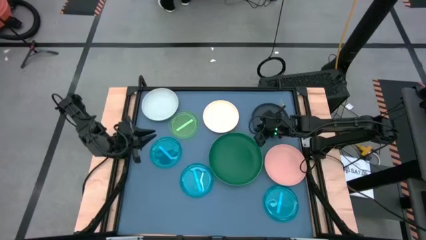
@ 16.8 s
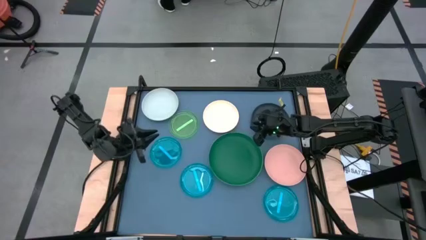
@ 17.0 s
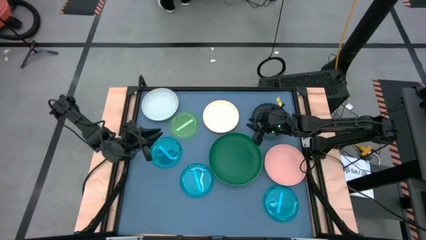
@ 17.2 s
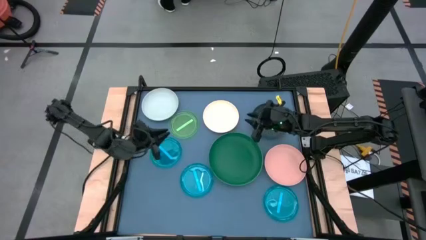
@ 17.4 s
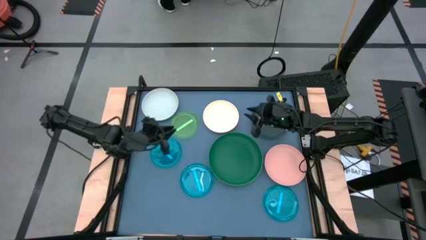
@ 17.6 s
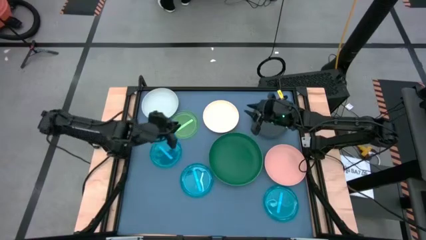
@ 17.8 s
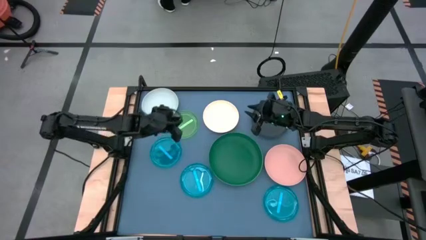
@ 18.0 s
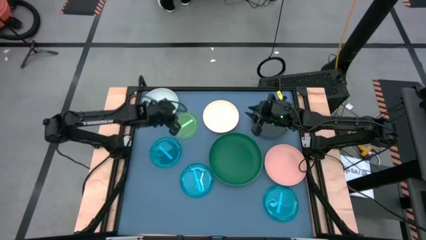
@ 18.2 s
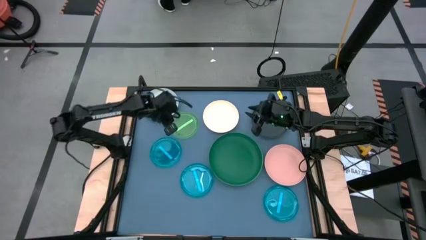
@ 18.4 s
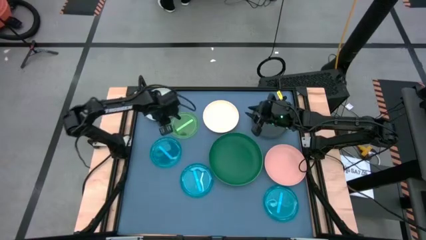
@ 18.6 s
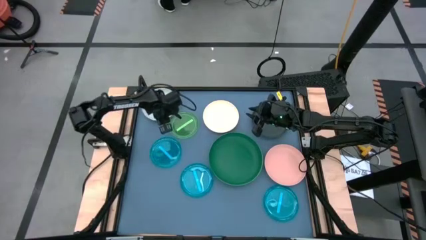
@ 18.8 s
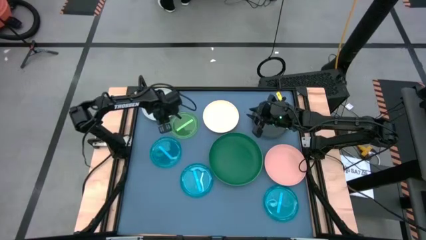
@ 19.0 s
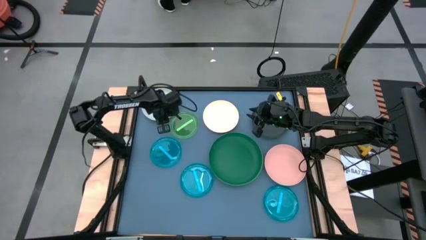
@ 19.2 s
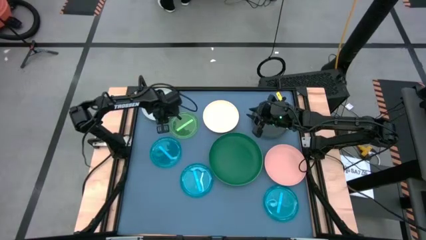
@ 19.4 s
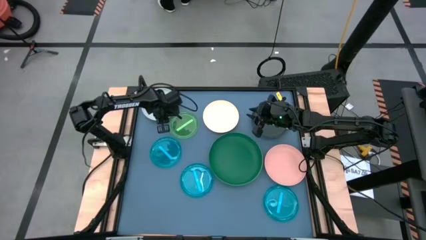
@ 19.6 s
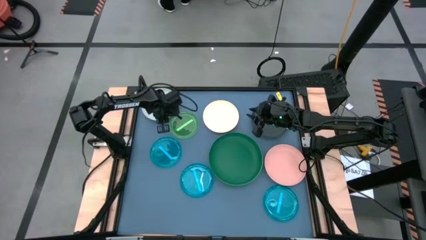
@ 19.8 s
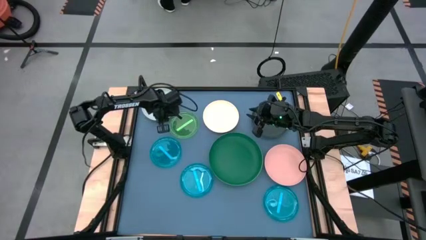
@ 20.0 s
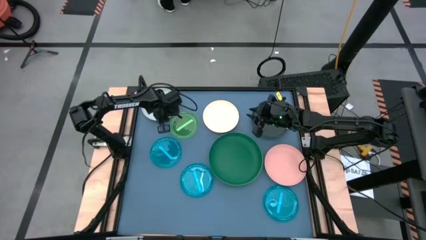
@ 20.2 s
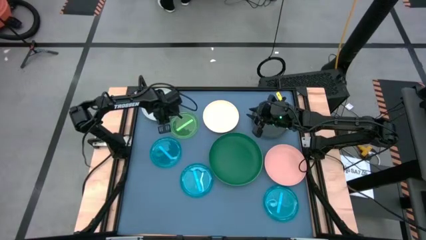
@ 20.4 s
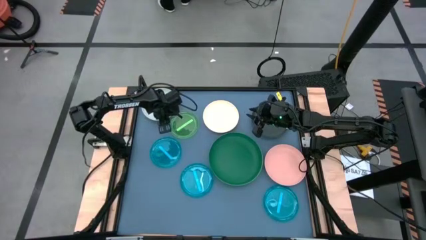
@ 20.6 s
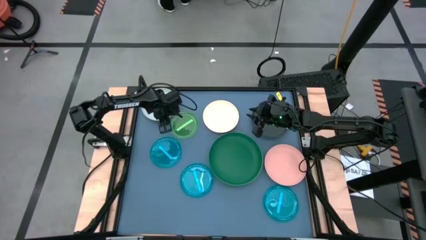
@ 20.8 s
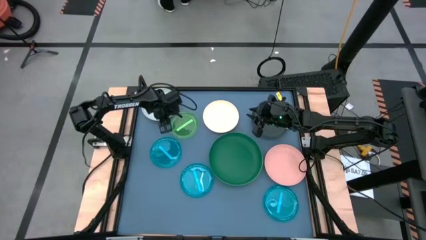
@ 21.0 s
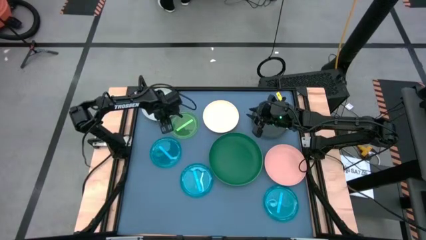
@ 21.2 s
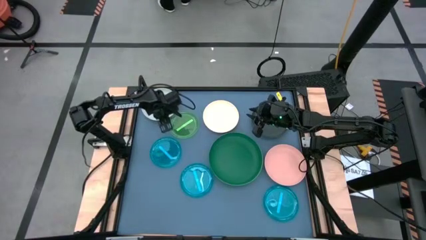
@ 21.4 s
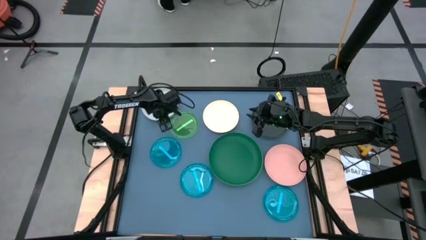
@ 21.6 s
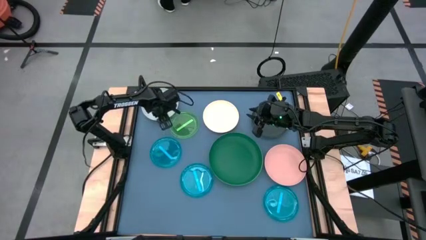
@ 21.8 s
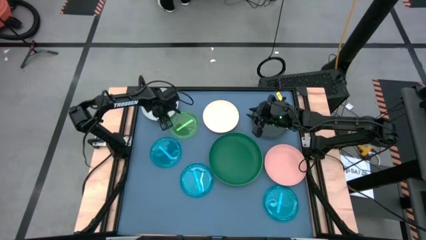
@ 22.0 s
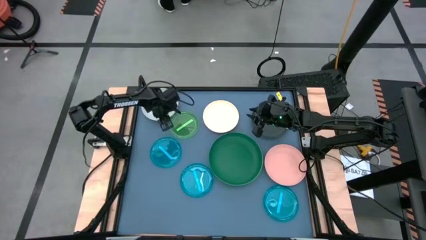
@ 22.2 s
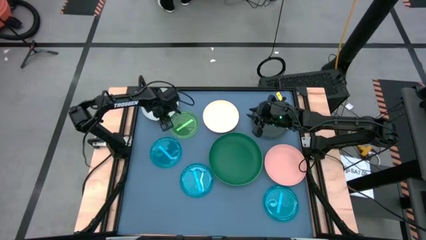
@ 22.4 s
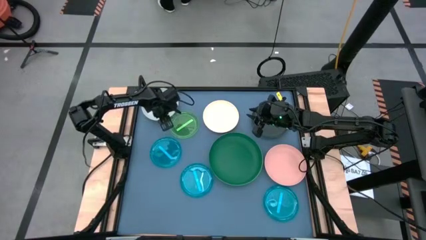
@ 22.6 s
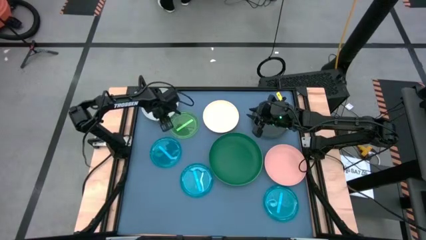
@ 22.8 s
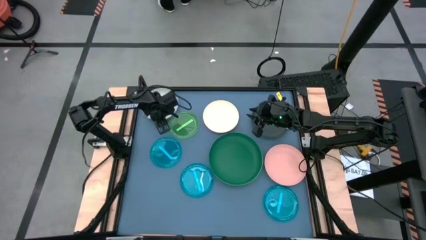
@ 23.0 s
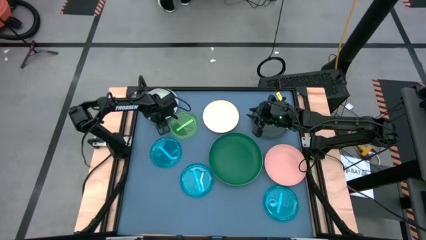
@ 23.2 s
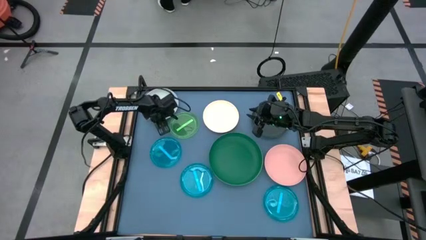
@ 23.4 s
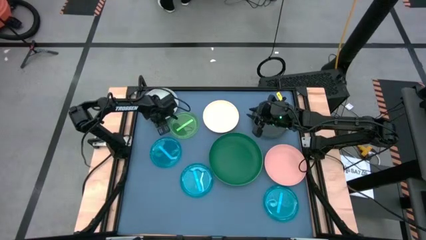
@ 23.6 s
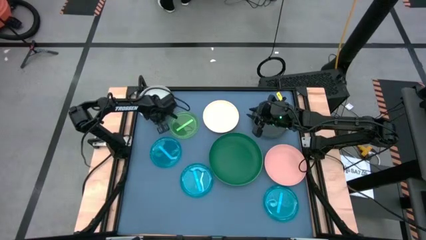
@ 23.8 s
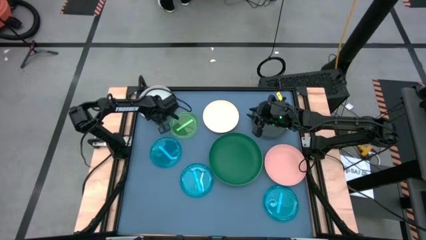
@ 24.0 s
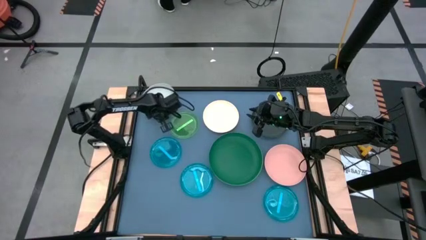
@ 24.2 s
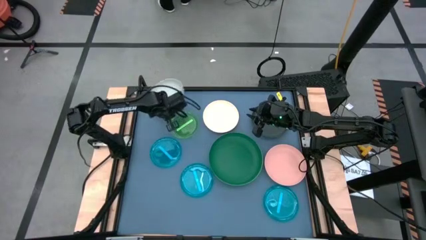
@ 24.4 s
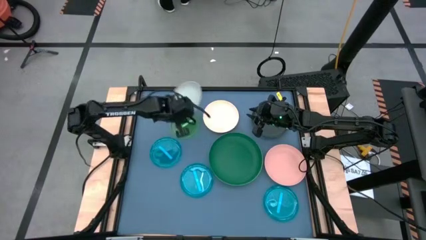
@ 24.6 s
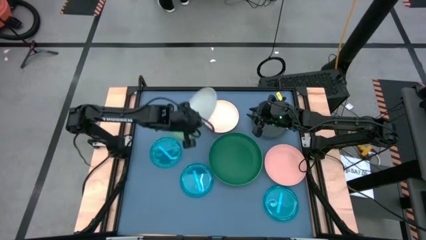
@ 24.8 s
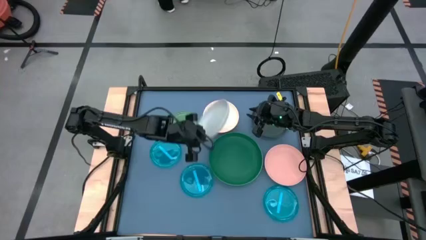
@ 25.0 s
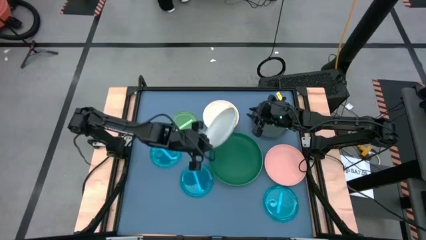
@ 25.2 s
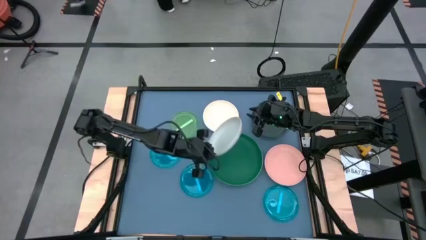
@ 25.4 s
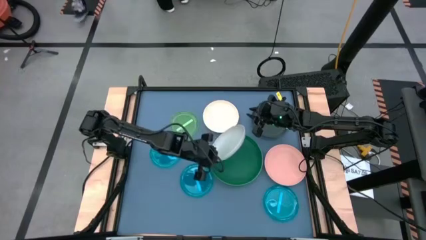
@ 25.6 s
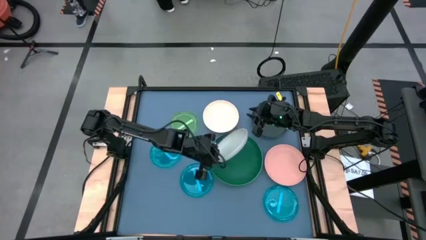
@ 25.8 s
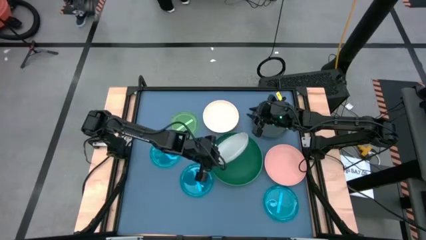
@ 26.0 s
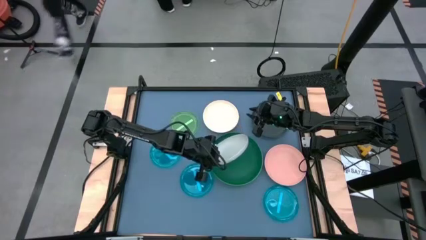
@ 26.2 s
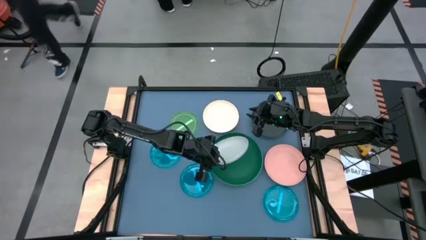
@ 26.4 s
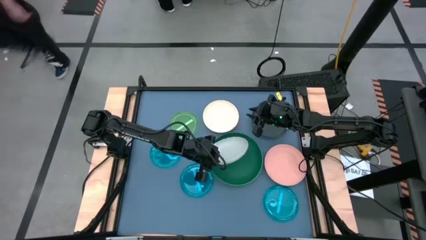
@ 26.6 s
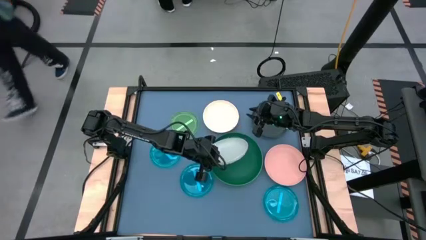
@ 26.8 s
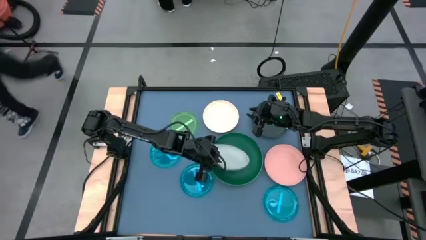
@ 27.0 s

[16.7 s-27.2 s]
Task: Stack plastic plates
Stack the gray plate on top of the dark green plate

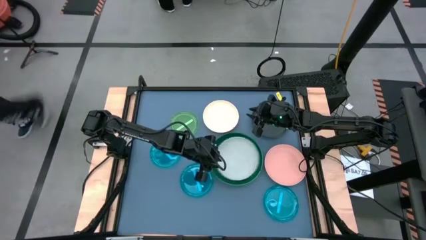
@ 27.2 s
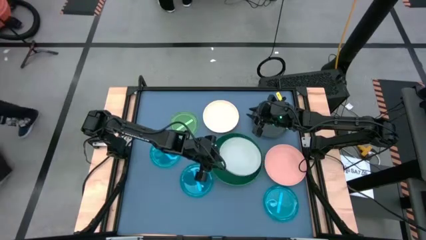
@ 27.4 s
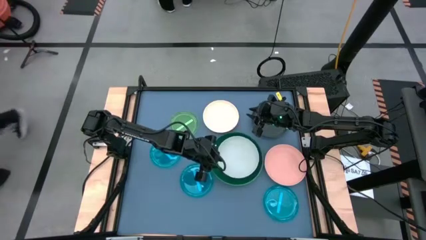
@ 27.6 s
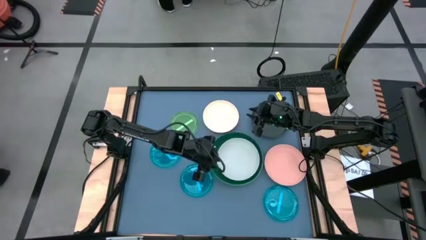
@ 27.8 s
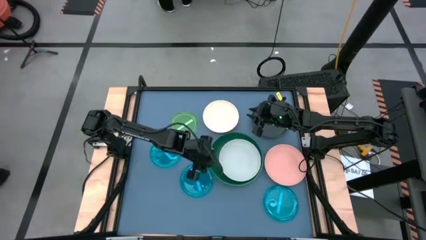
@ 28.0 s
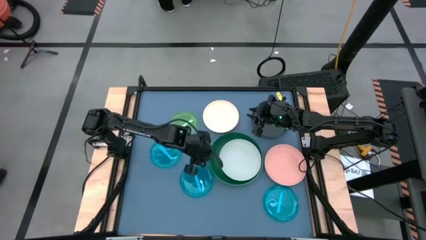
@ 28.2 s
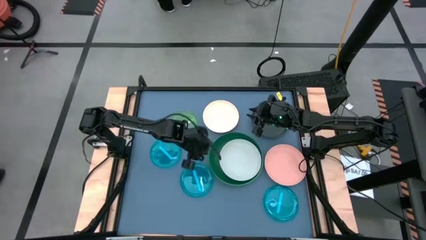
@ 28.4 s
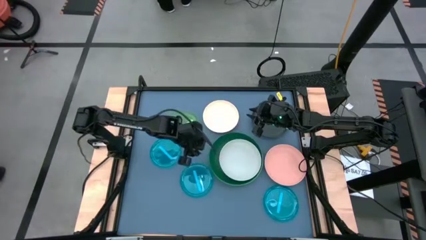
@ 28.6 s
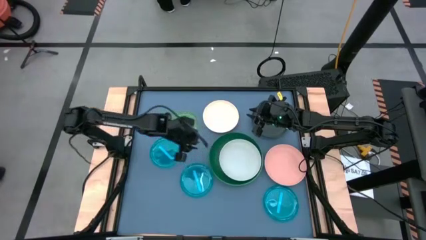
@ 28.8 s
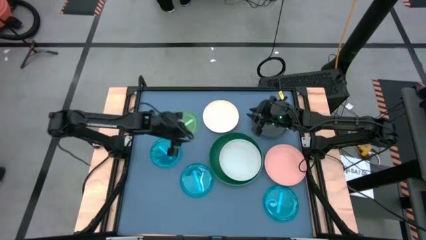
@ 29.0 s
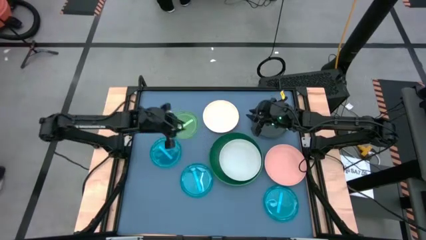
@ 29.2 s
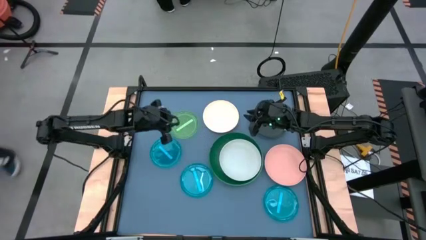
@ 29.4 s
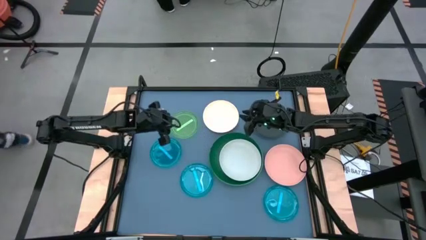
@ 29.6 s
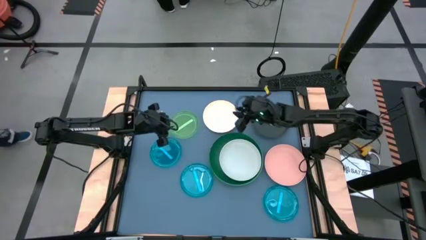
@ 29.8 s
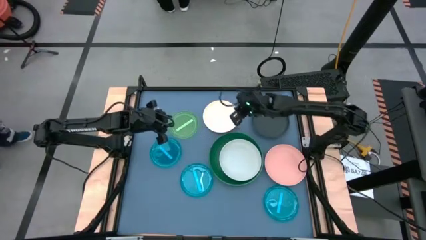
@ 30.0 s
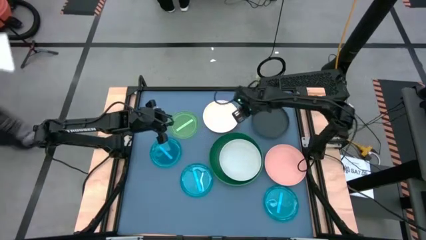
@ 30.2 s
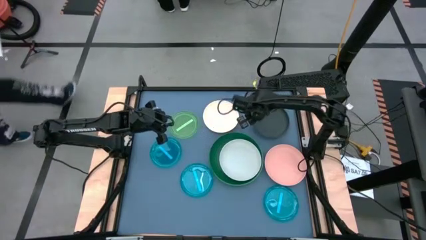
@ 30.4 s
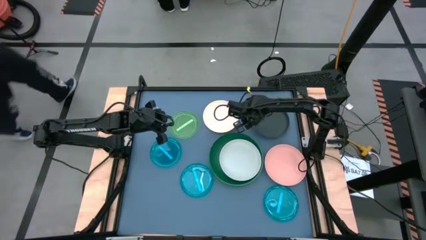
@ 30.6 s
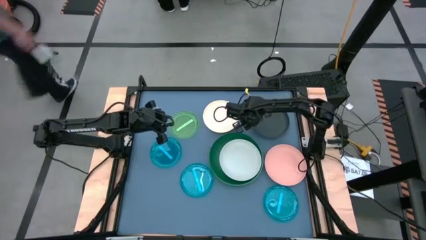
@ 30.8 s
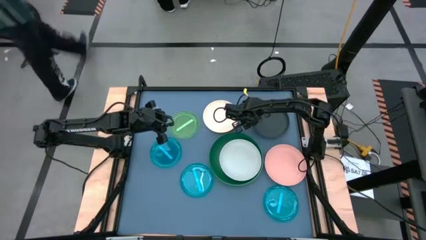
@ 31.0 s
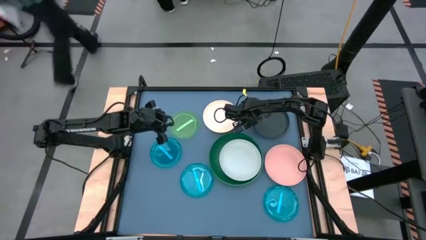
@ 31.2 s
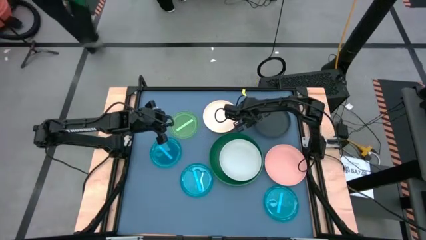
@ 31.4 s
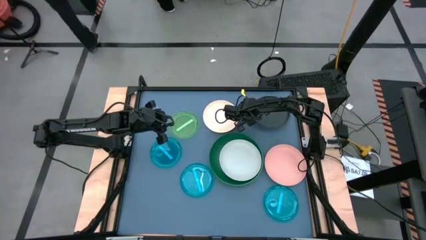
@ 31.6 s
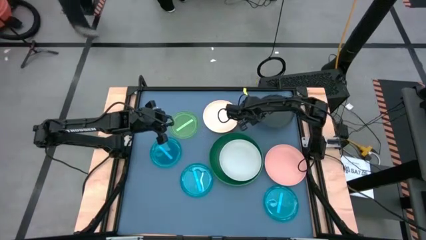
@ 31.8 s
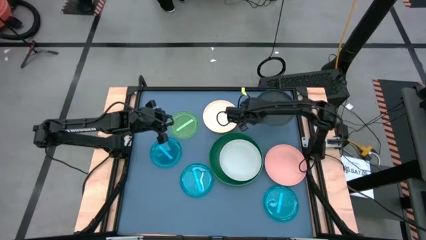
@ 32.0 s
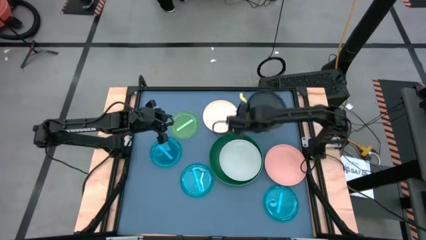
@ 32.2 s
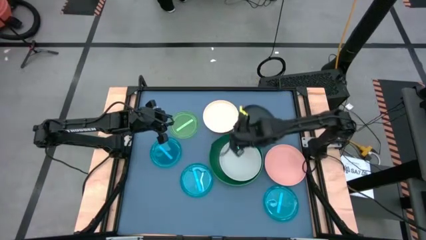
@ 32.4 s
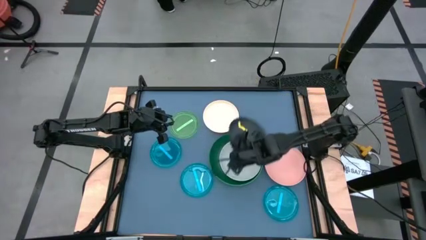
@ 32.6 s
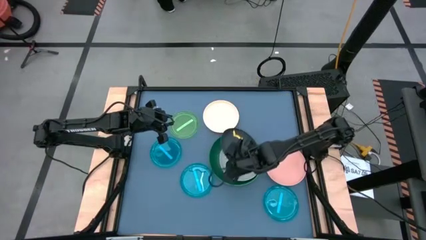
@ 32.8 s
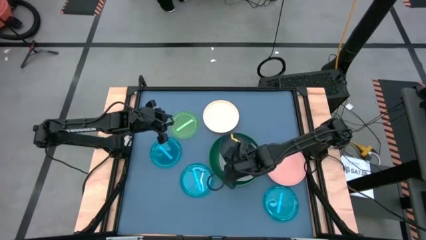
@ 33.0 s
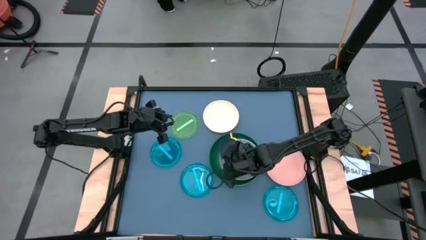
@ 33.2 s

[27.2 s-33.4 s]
Stack the black plate on top of the gray plate

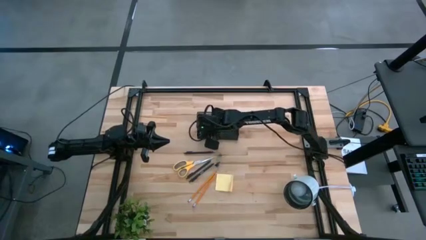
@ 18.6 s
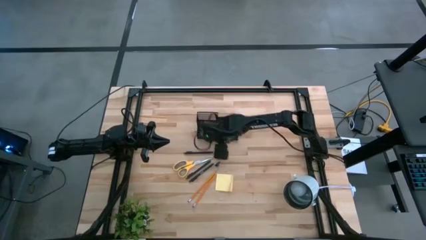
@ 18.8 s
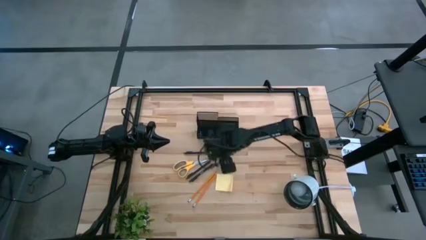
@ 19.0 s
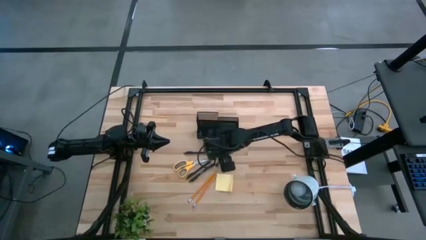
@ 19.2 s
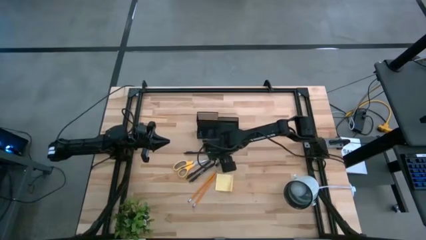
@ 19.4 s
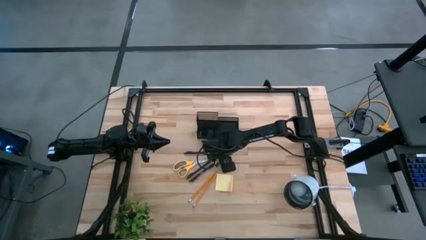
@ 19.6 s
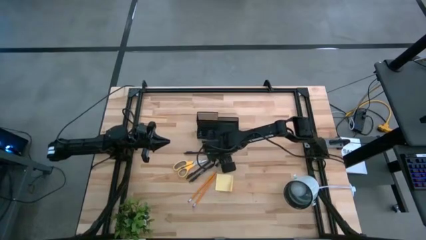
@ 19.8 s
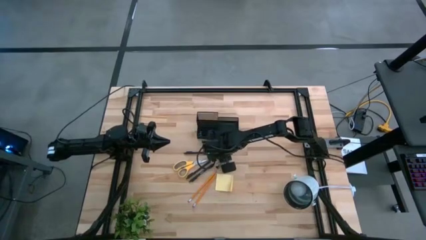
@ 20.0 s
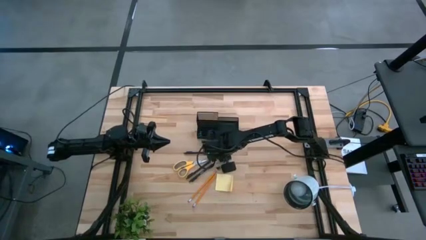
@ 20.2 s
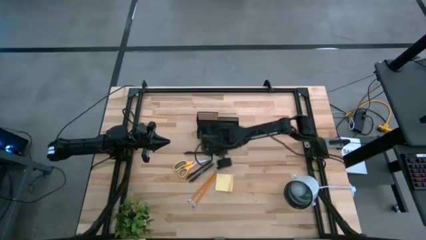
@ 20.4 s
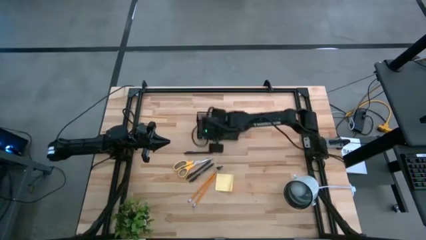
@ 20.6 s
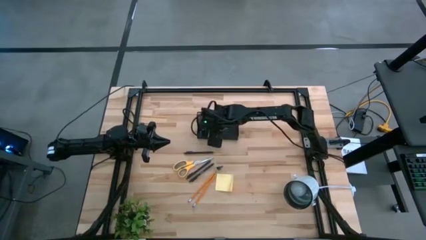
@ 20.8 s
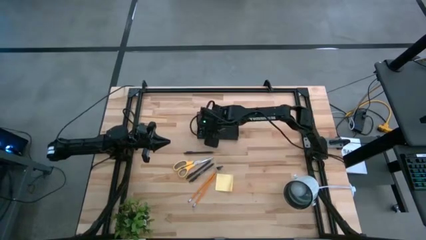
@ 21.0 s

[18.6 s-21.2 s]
Task: Pick and place office supplies into organizer
Put the top black binder clip into the black organizer bin
